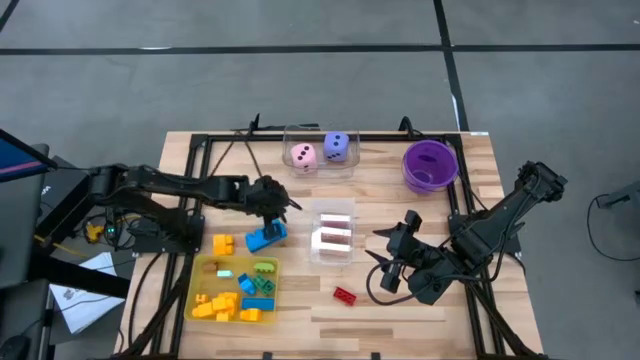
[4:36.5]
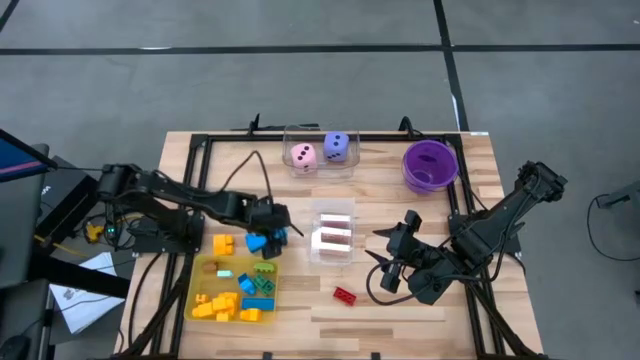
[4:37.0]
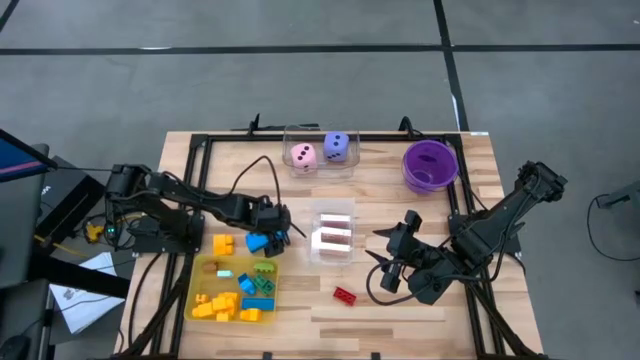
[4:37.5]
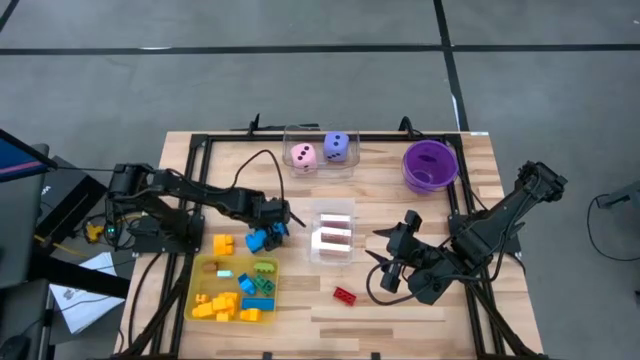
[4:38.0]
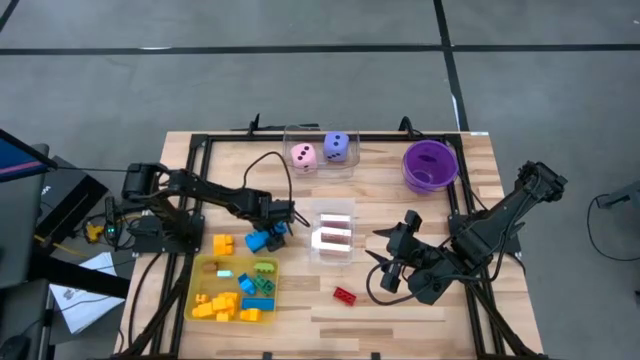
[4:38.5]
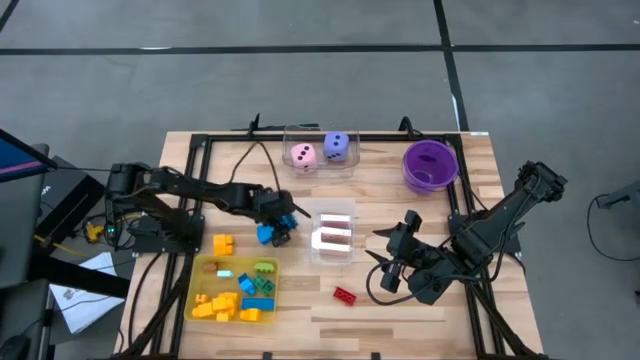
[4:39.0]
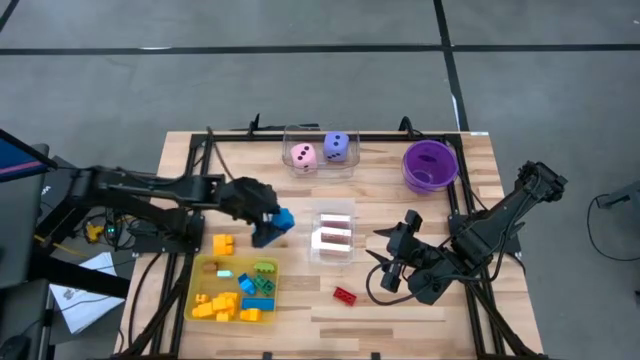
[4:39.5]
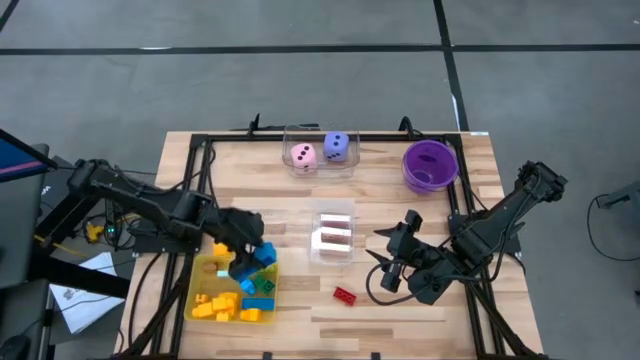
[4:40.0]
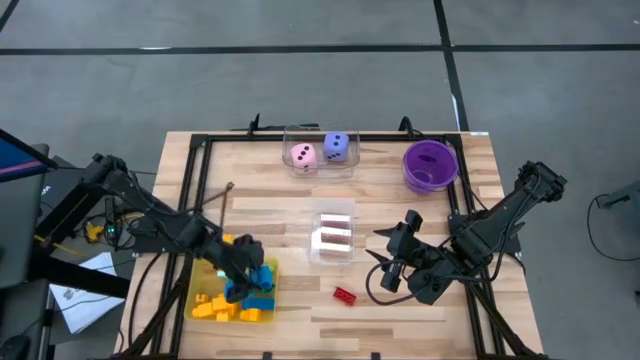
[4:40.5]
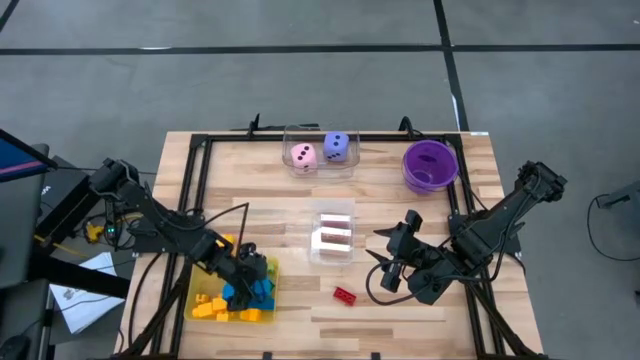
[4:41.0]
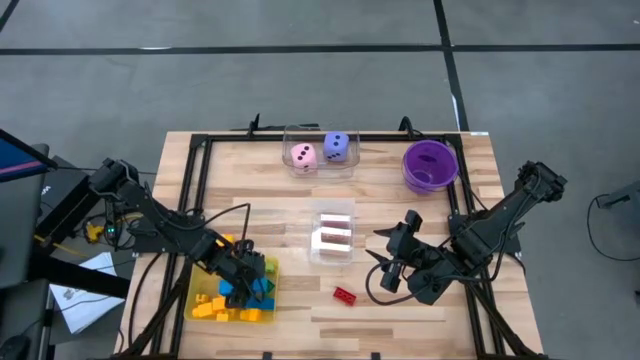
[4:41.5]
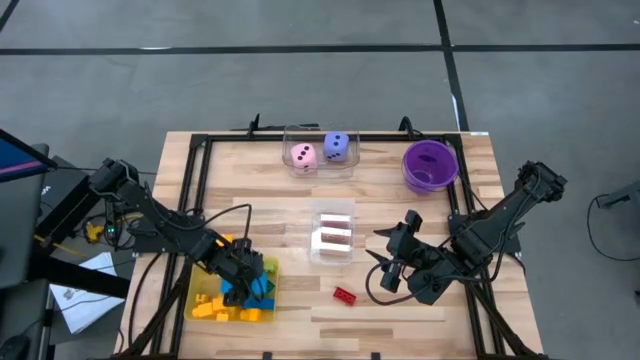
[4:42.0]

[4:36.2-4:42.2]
Task: Pick & Place Toys
Put the light blue game piece into the yellow bin

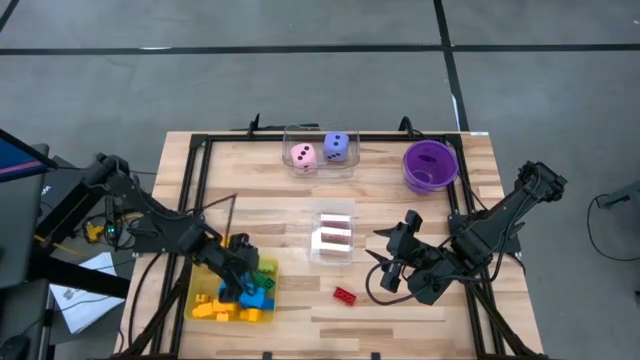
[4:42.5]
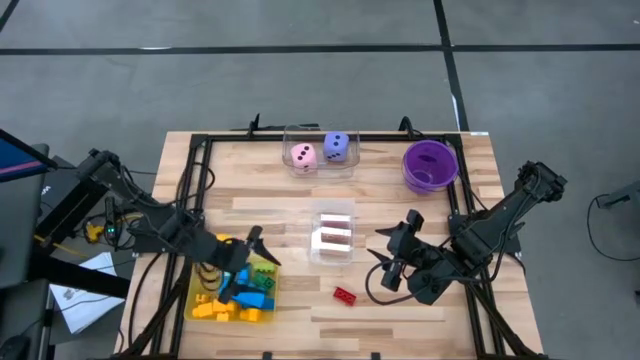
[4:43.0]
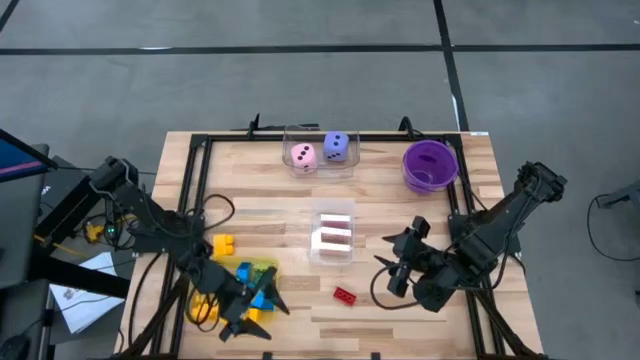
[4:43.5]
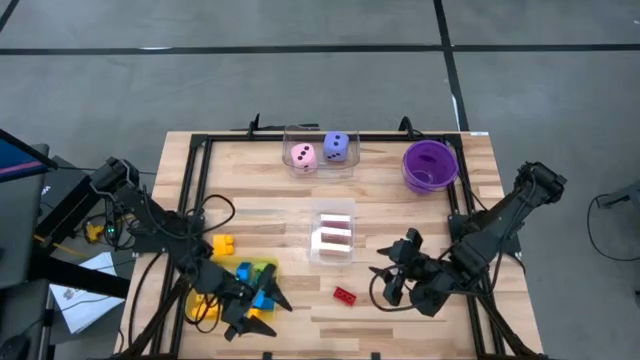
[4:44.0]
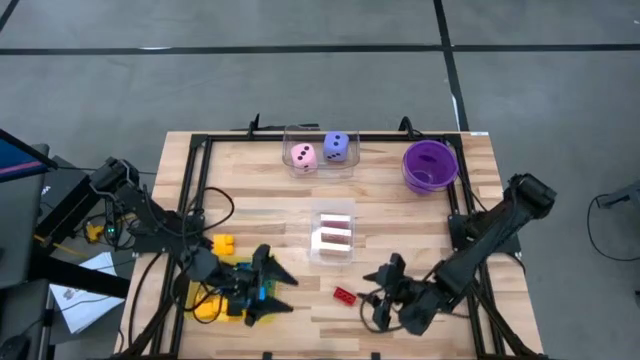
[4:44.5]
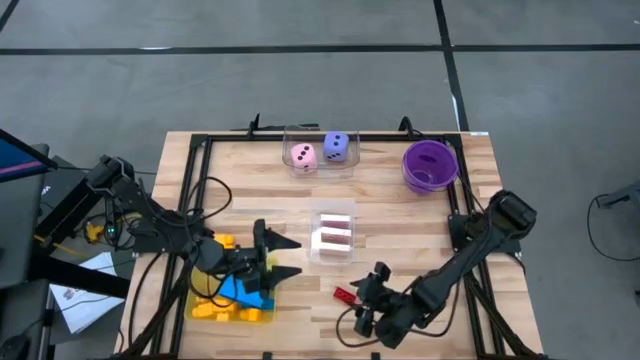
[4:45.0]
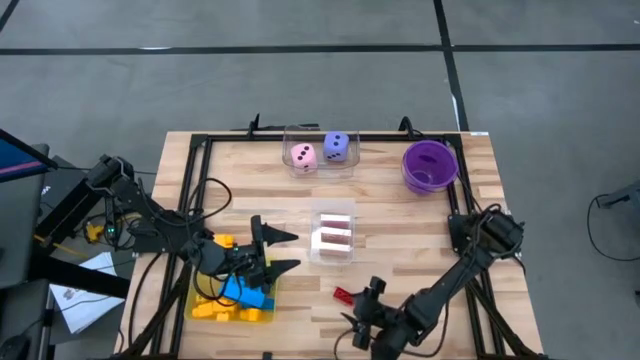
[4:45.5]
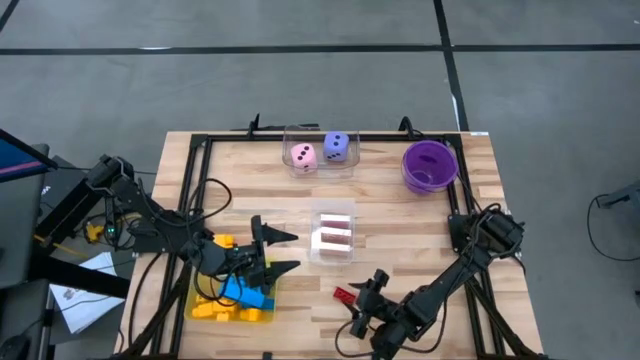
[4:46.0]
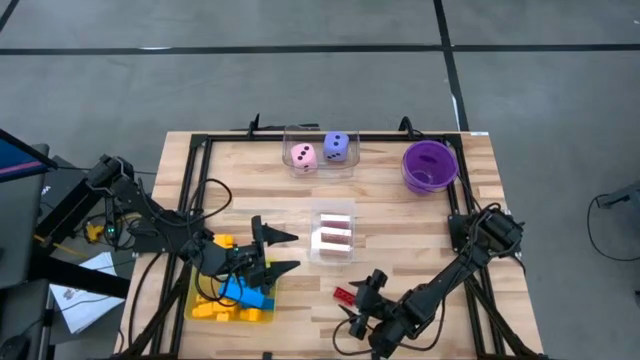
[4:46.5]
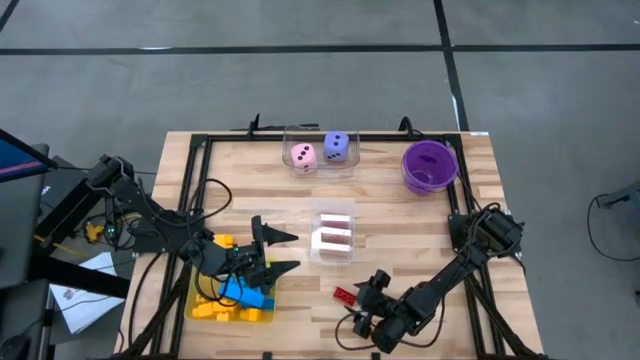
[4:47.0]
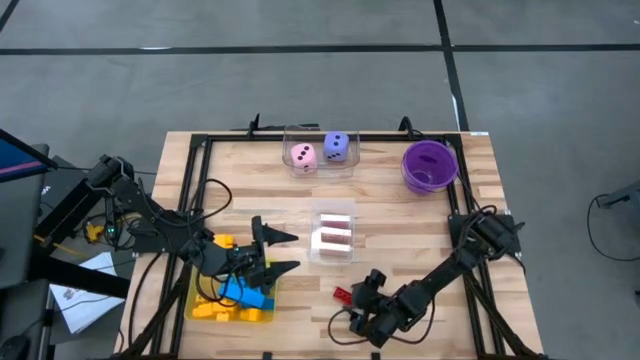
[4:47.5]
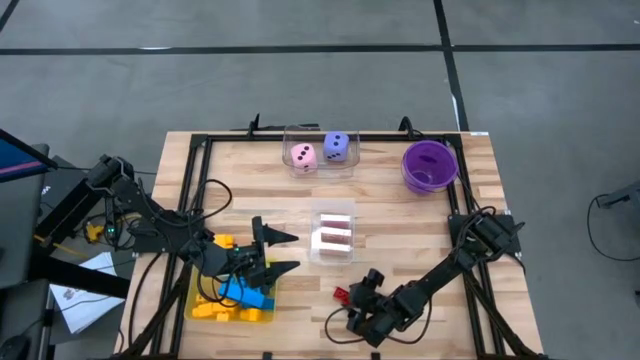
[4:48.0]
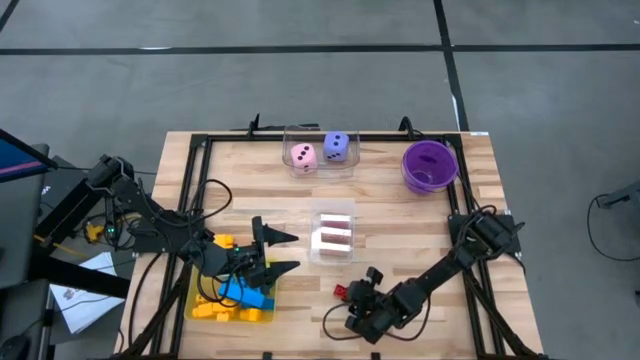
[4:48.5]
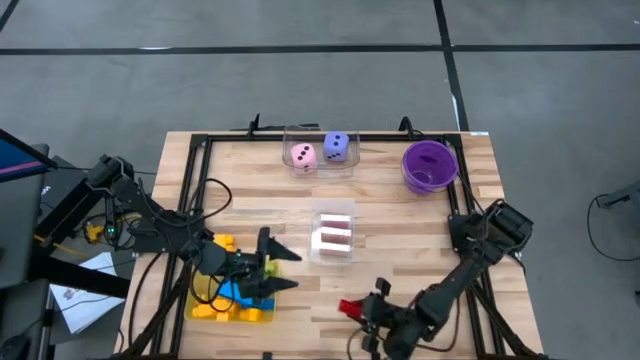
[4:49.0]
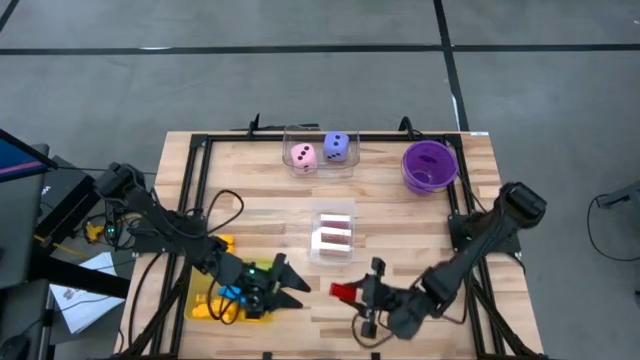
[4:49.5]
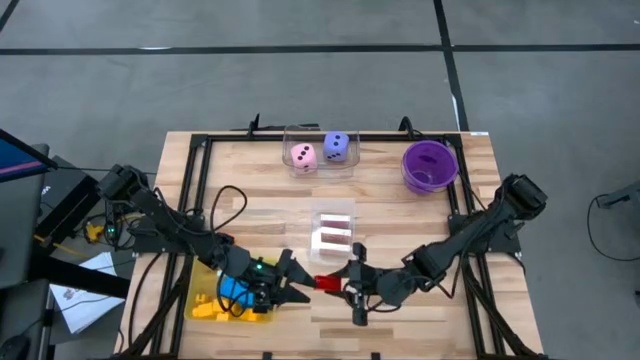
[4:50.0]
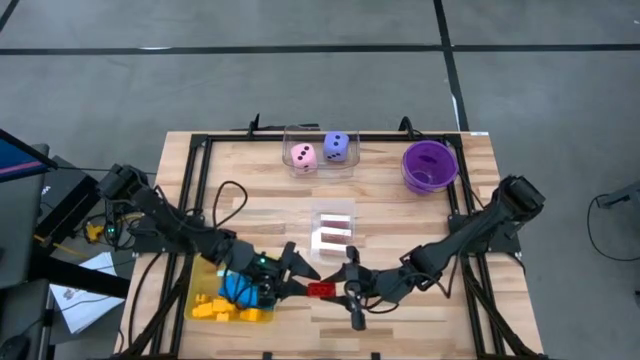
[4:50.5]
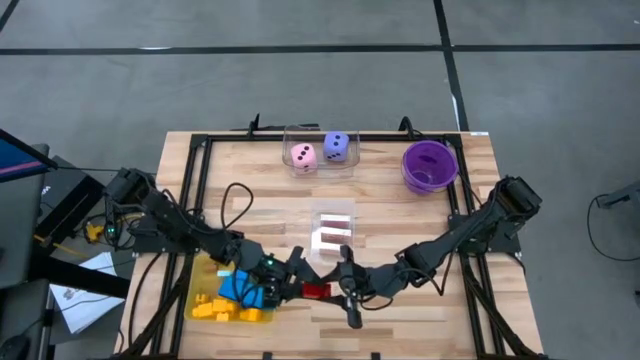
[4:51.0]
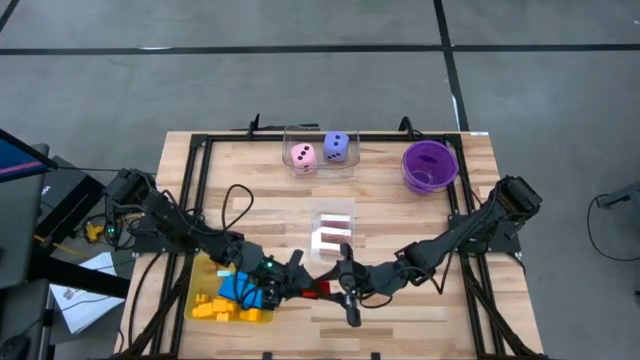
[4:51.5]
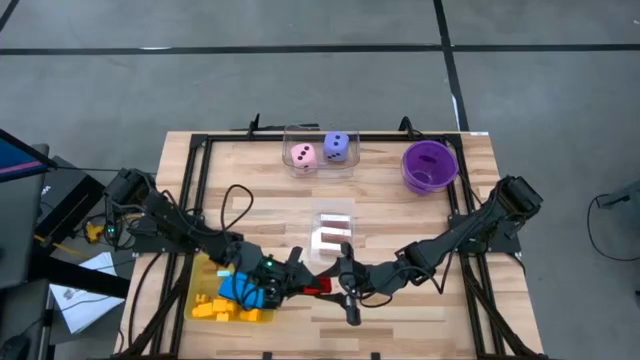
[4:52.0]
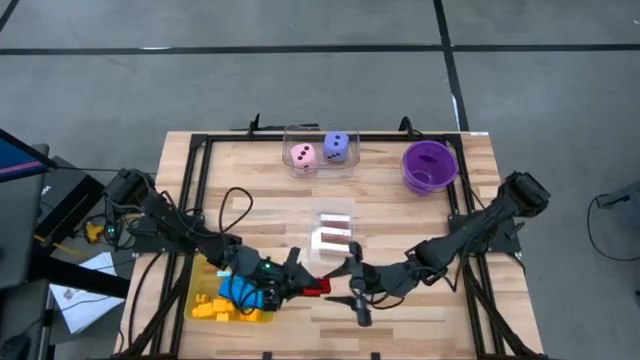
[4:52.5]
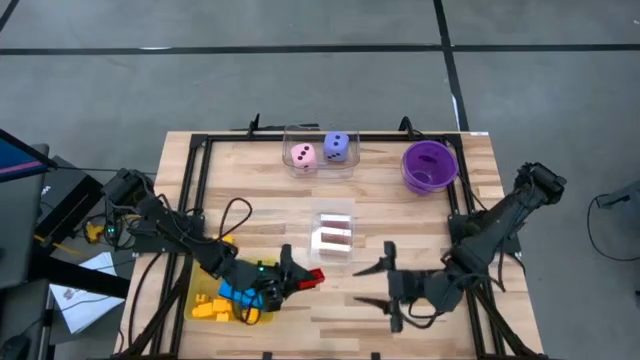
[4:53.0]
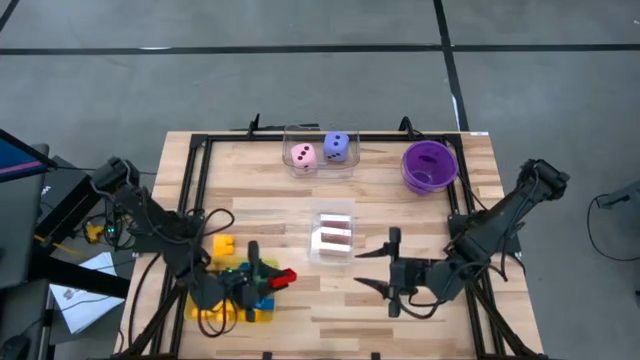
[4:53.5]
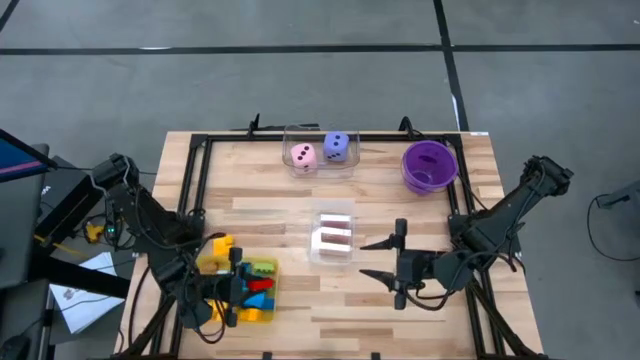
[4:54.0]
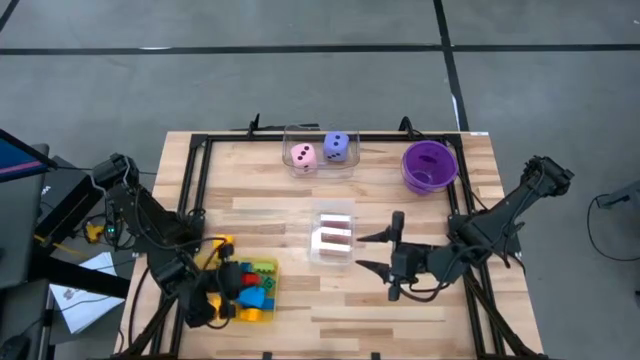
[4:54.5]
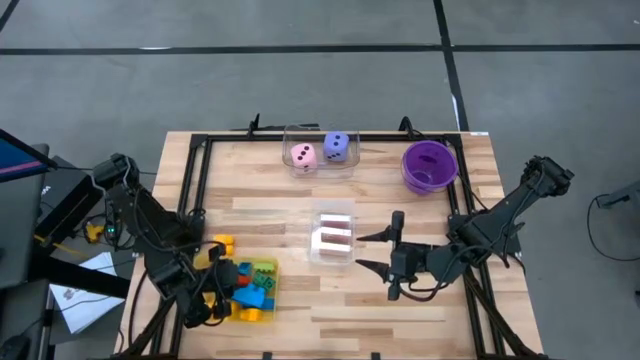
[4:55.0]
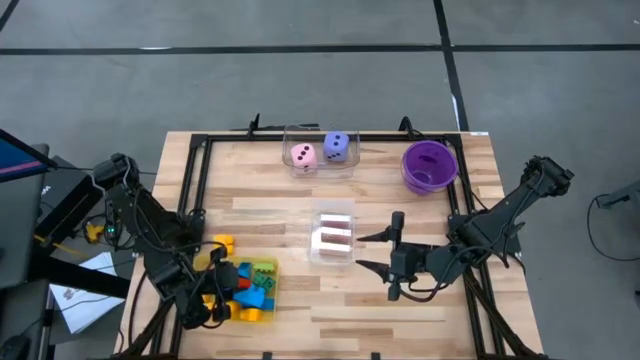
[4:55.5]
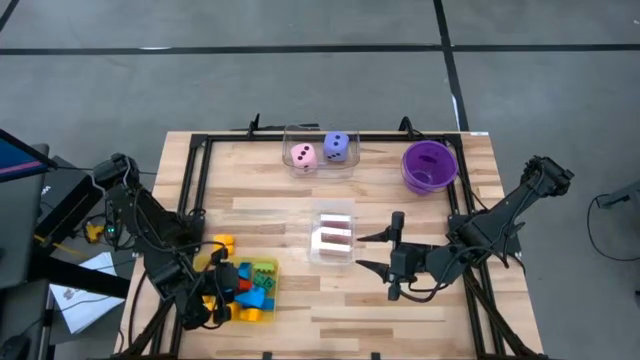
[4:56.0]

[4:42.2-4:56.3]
Put the red game piece into the yellow bin

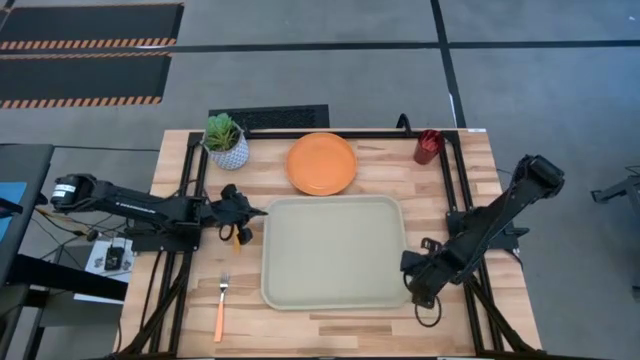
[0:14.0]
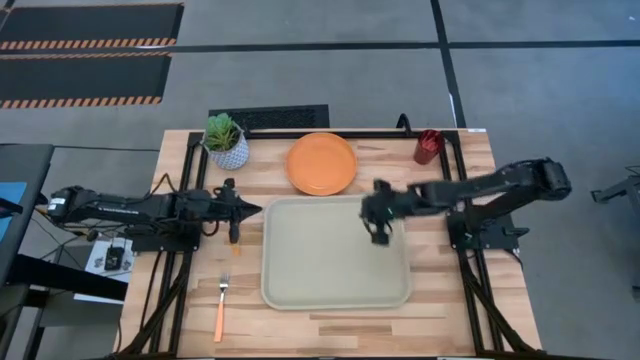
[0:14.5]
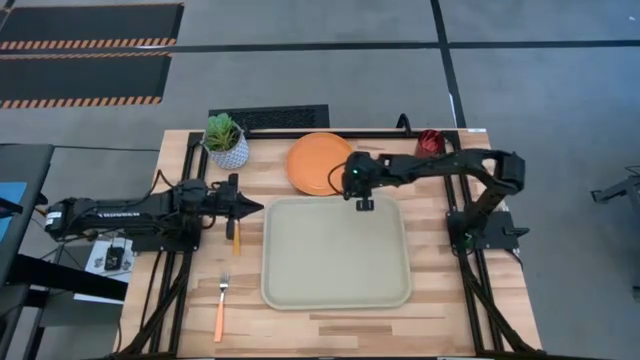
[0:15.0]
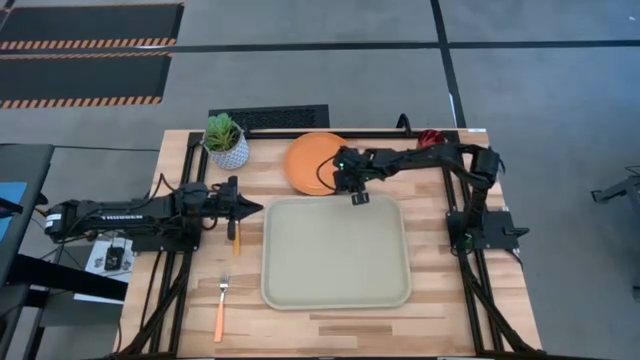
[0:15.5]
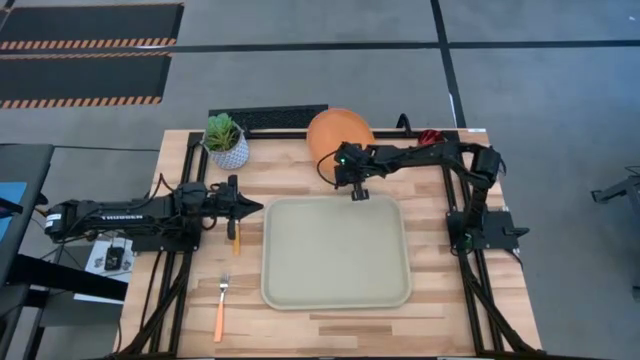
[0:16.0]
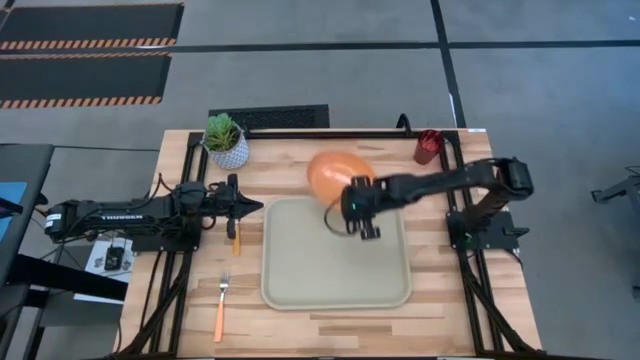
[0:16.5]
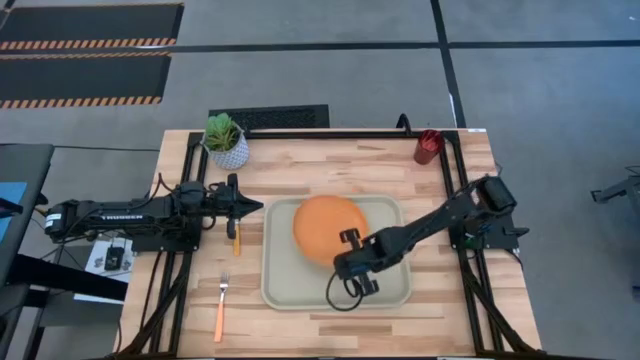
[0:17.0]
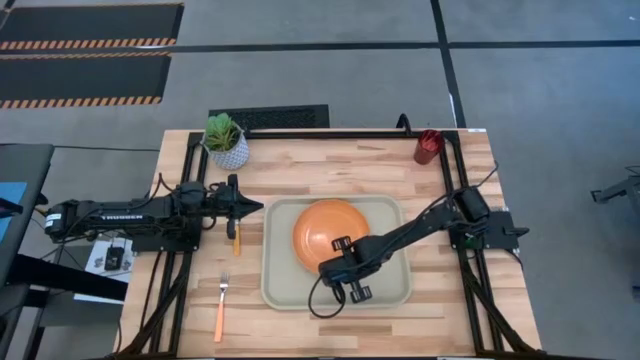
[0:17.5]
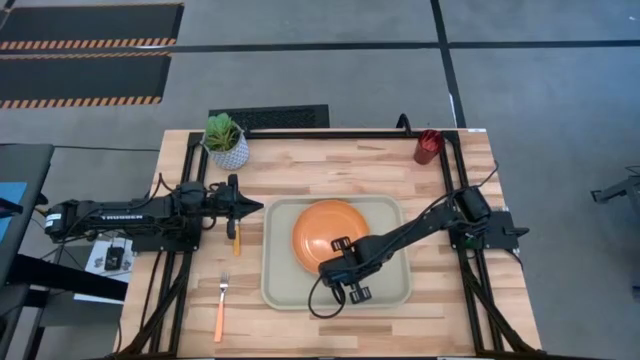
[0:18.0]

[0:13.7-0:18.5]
Task: Pick and place plate/cup/fork/spoon on tray
Put the orange plate on the gray serving tray
